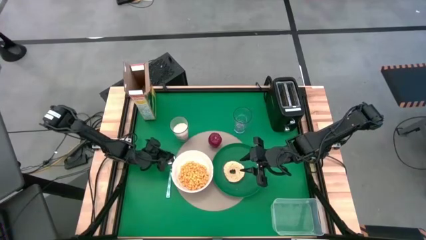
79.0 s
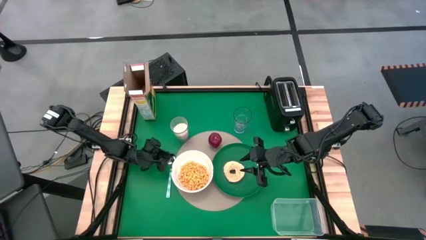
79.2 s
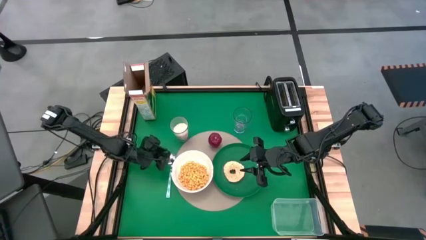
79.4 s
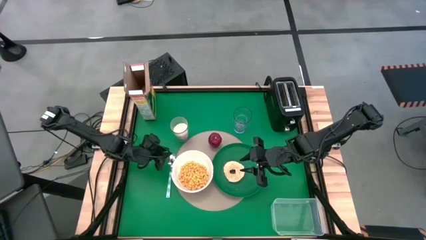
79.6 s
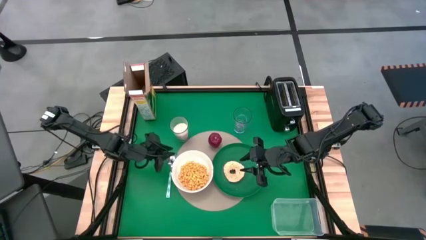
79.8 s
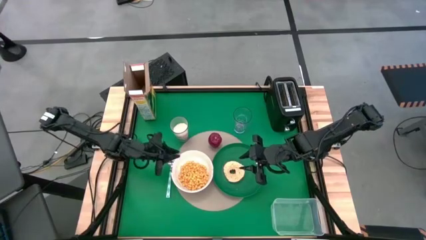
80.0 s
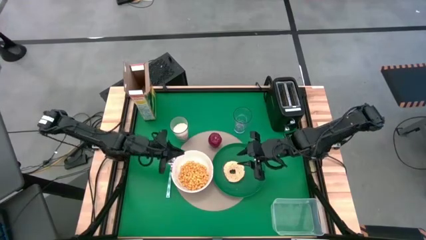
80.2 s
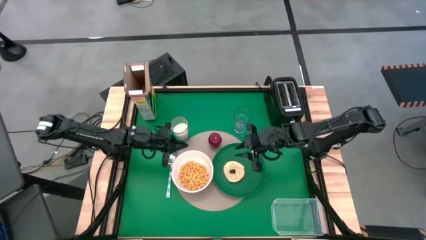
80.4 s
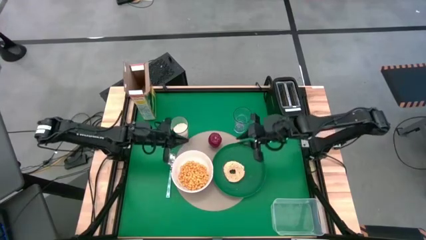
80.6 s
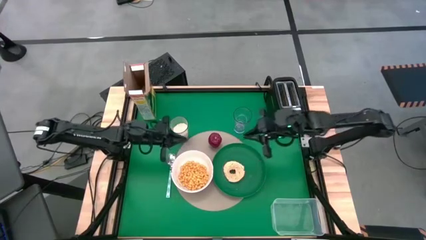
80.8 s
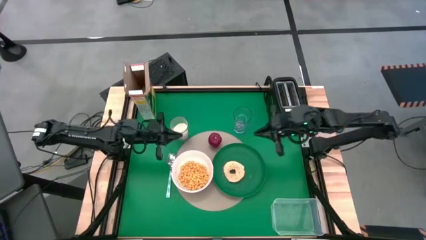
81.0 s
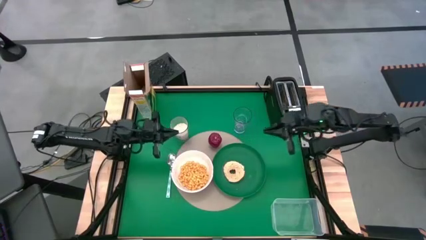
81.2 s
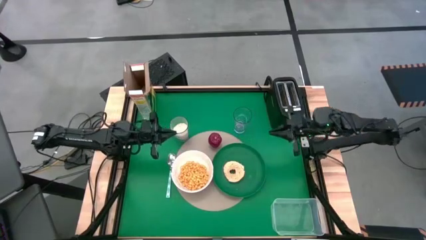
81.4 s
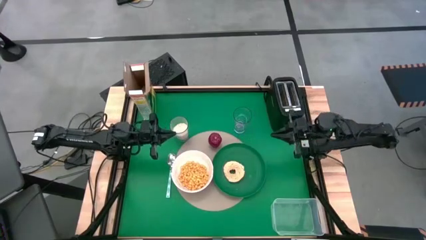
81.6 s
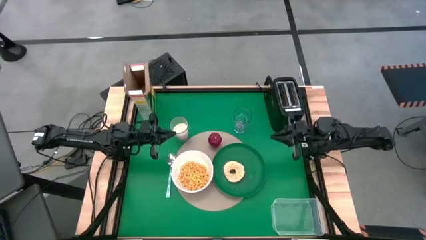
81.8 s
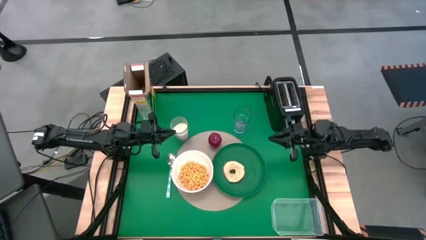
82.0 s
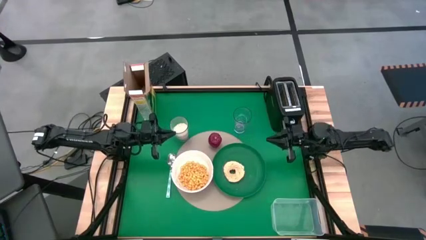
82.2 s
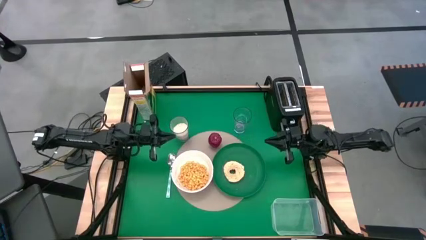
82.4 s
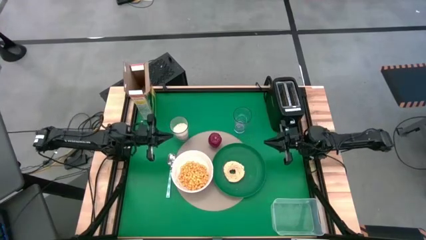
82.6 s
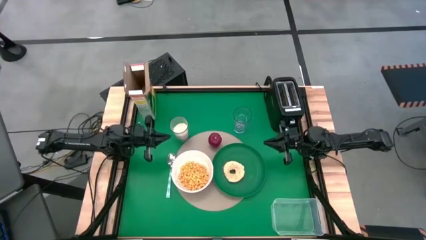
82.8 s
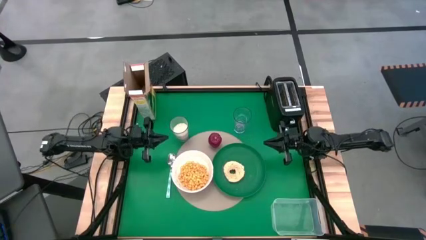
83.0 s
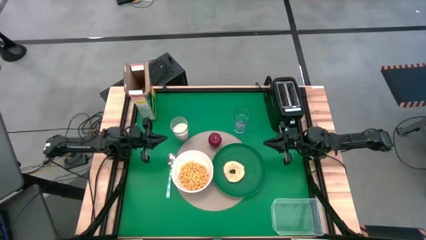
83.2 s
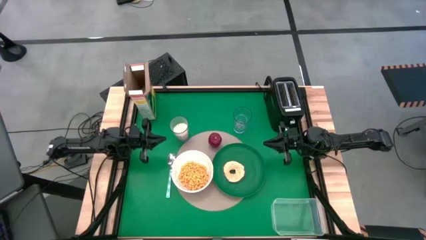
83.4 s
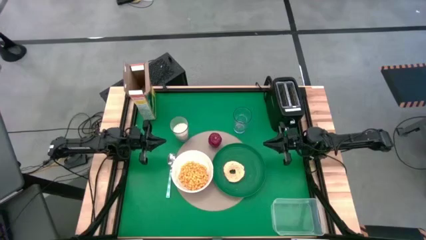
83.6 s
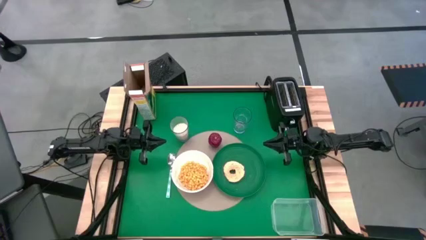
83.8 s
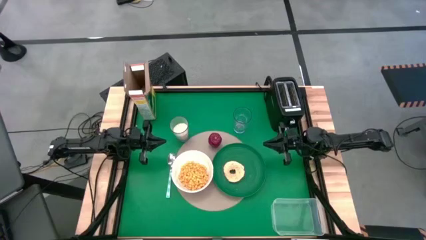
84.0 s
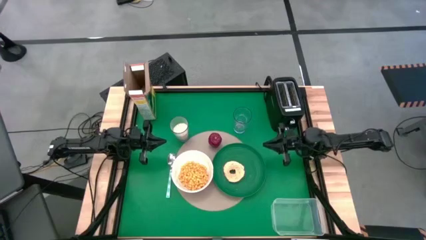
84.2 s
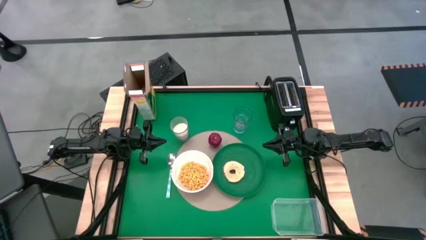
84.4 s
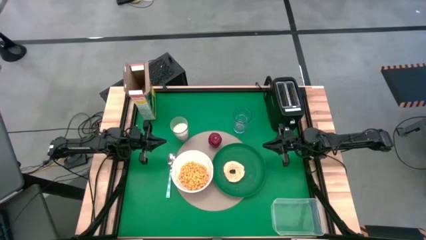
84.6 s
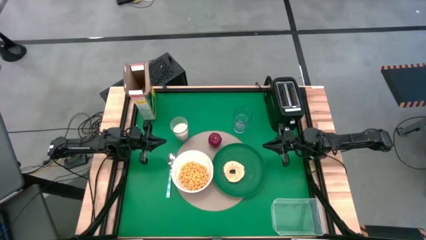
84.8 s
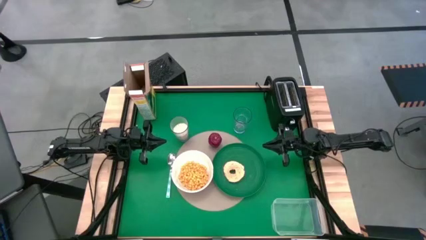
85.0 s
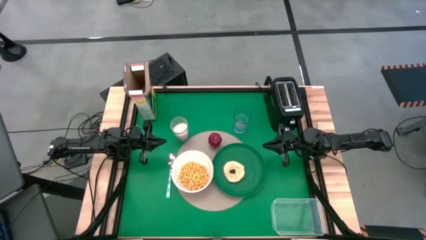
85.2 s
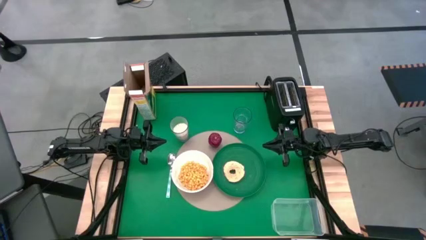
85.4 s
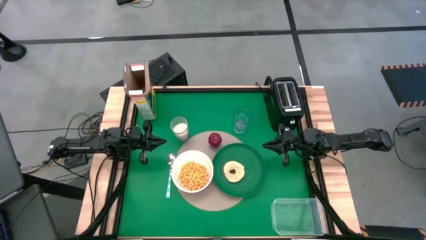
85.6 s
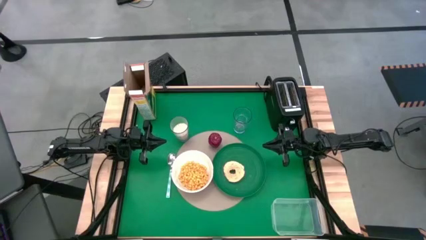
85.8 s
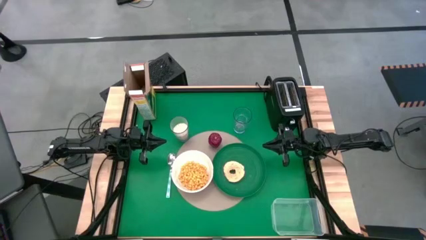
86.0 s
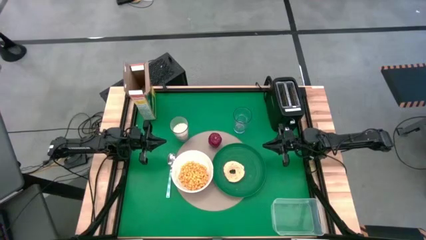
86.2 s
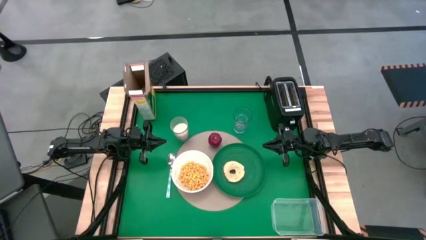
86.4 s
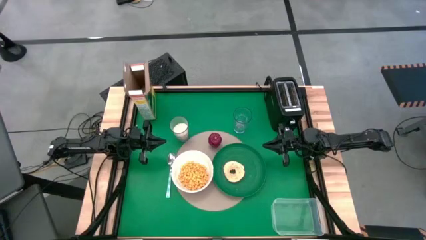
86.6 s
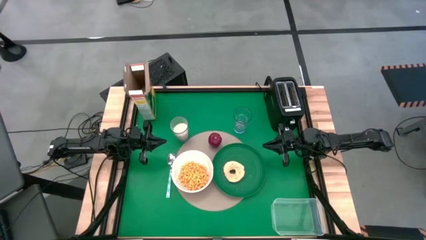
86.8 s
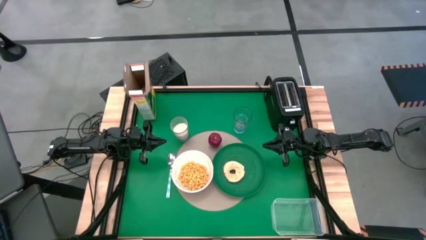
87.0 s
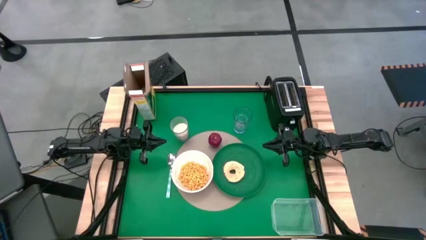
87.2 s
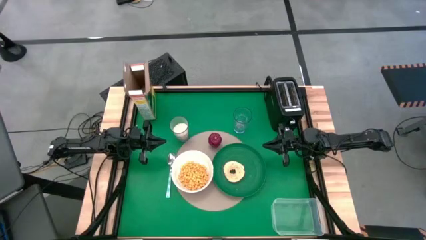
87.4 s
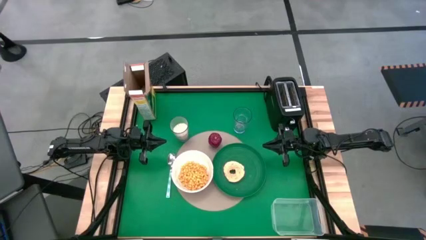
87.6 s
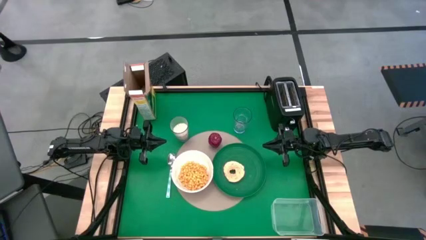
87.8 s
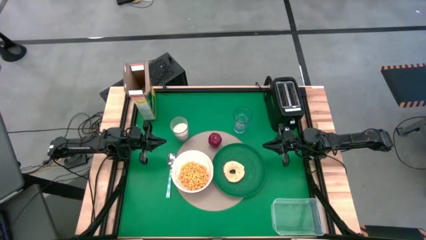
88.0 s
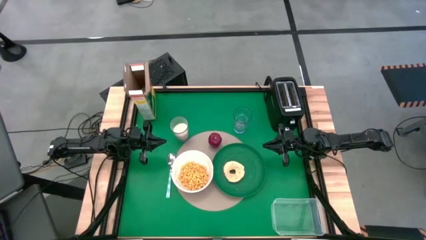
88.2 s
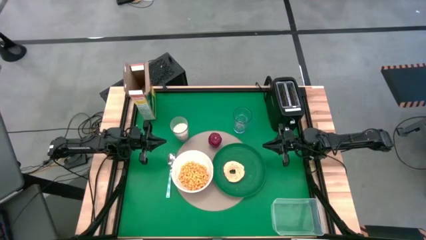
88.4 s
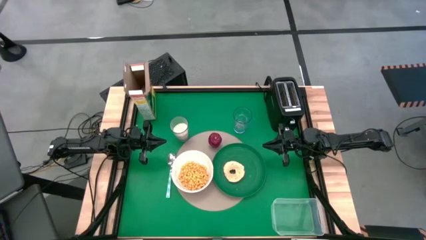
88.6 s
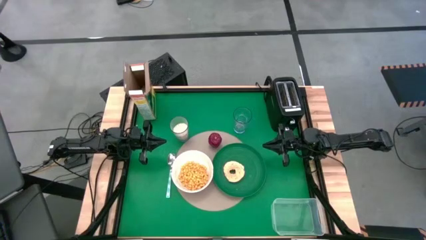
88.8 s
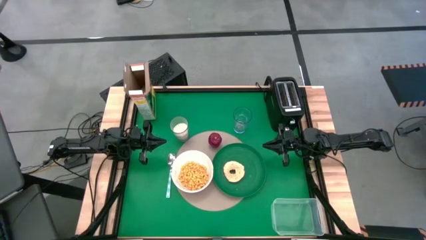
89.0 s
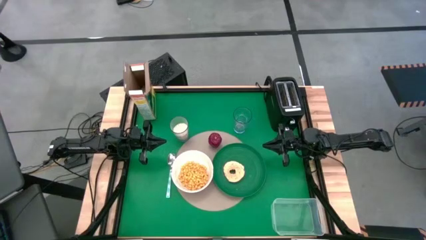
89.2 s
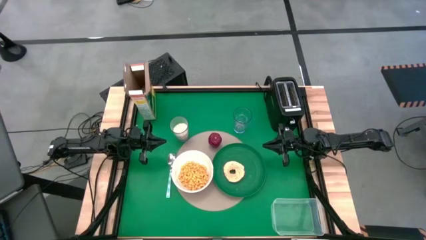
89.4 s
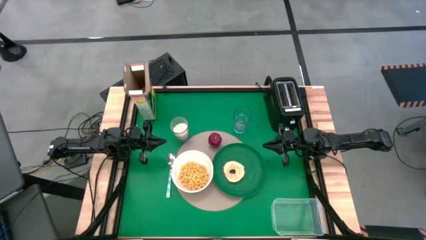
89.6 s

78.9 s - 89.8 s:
Task: Arrange a breakfast setting
Return to Home Position

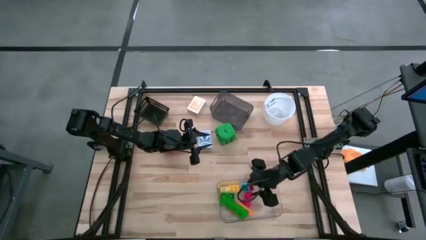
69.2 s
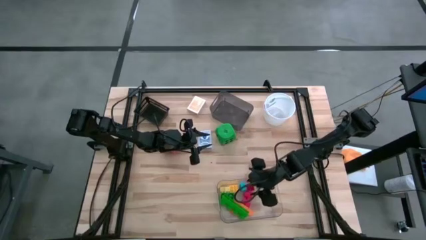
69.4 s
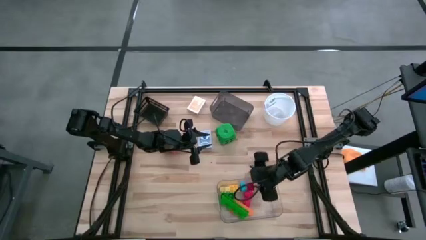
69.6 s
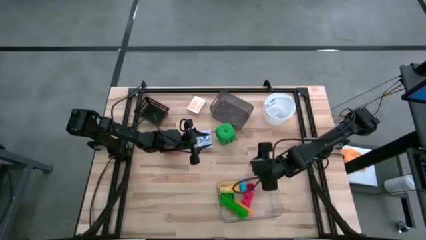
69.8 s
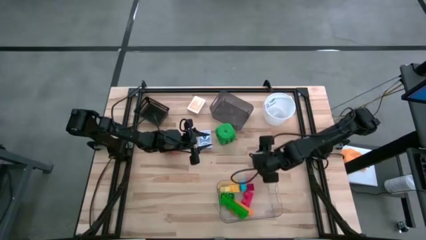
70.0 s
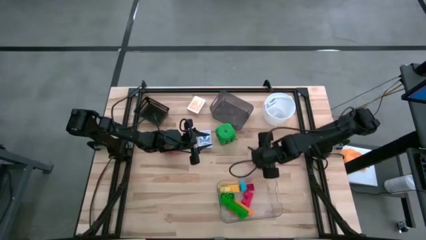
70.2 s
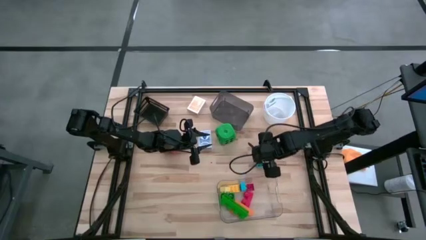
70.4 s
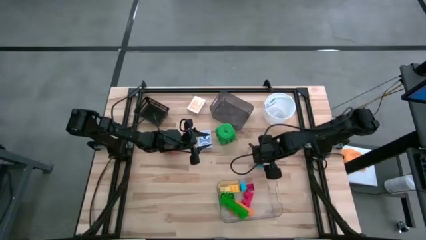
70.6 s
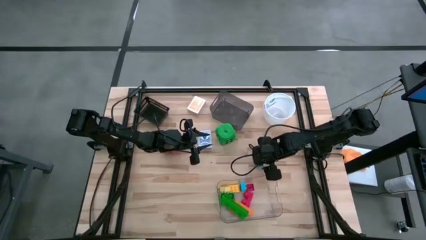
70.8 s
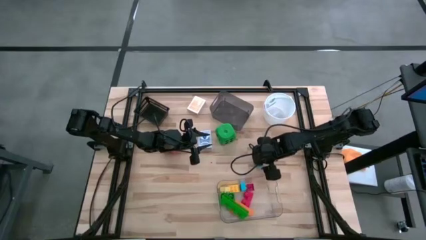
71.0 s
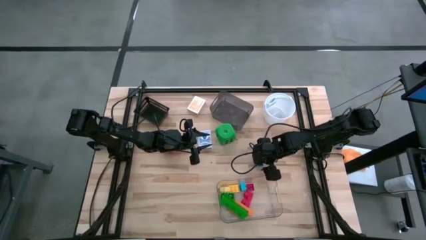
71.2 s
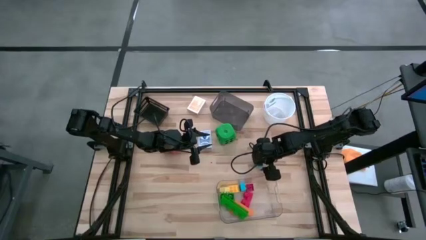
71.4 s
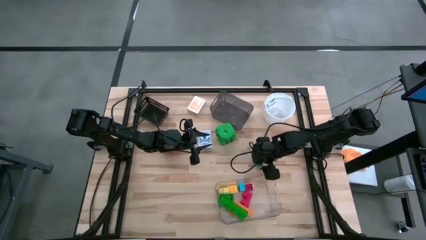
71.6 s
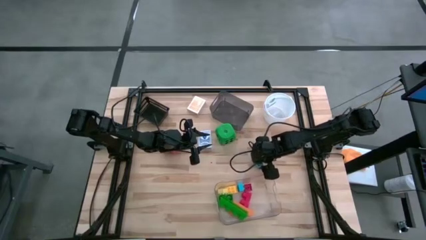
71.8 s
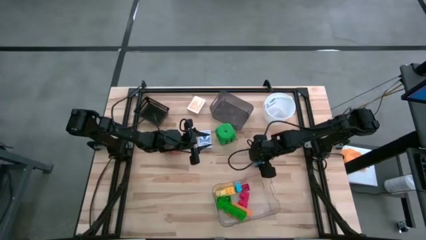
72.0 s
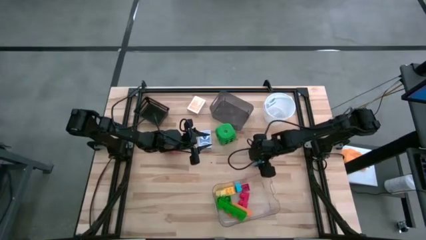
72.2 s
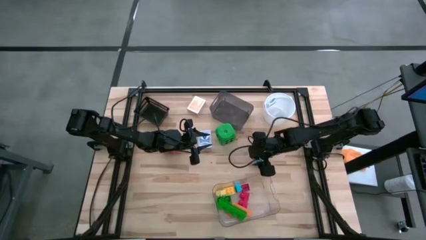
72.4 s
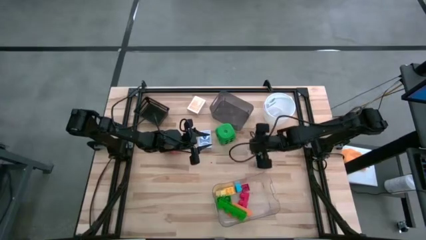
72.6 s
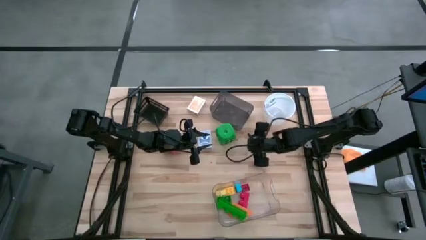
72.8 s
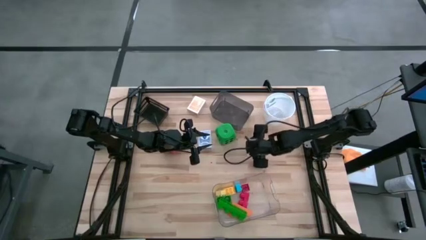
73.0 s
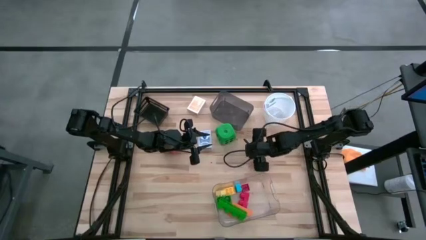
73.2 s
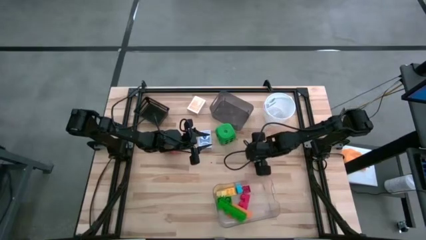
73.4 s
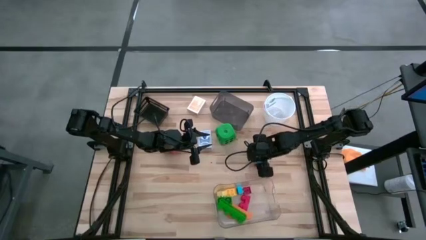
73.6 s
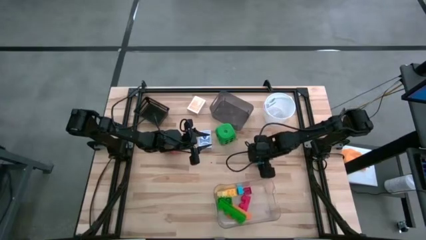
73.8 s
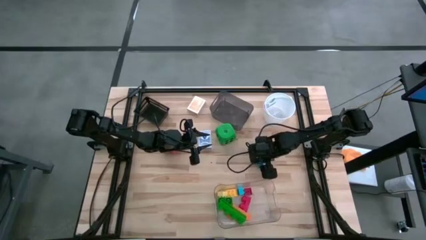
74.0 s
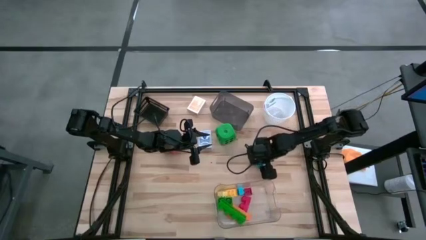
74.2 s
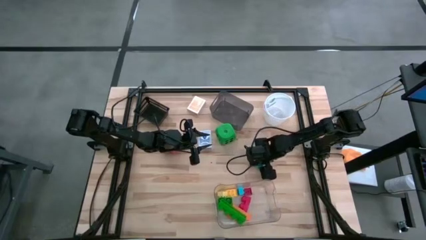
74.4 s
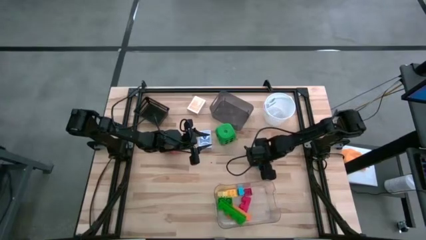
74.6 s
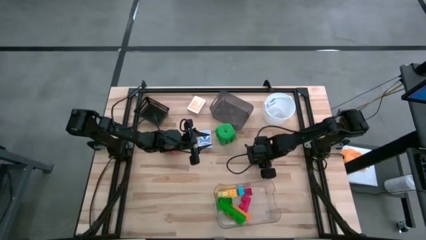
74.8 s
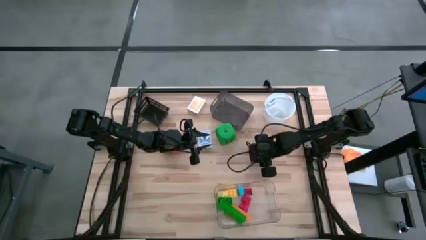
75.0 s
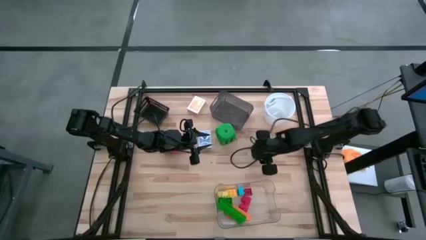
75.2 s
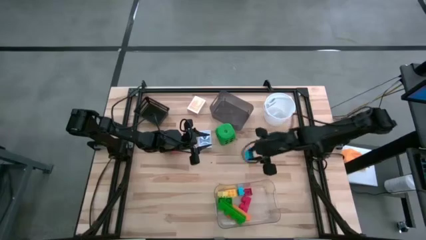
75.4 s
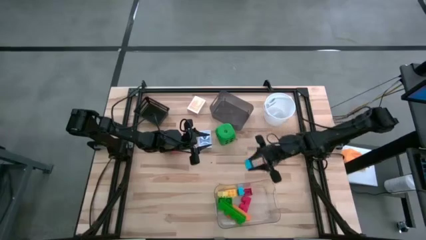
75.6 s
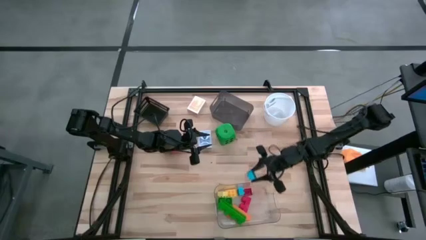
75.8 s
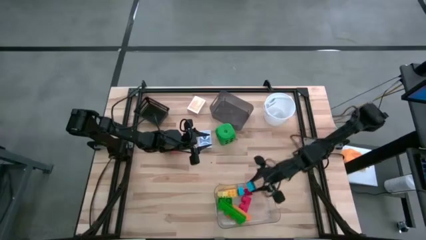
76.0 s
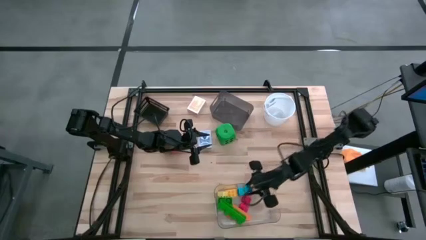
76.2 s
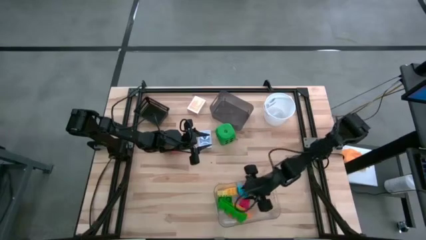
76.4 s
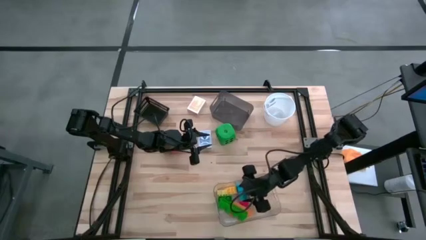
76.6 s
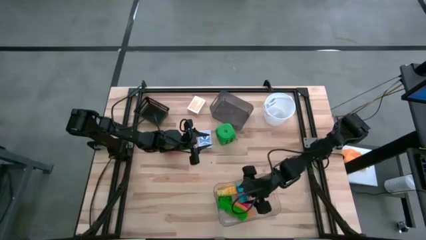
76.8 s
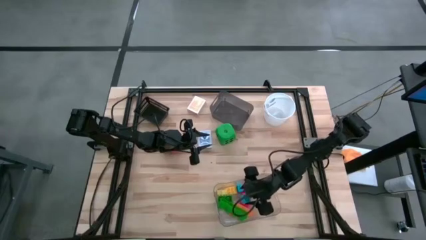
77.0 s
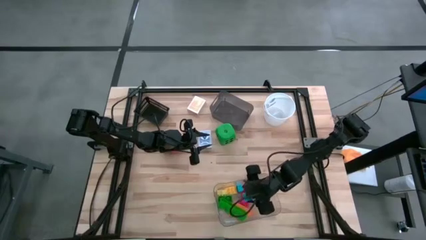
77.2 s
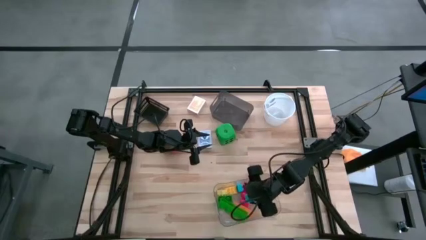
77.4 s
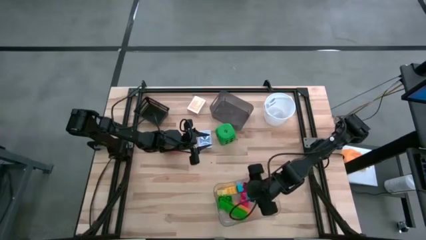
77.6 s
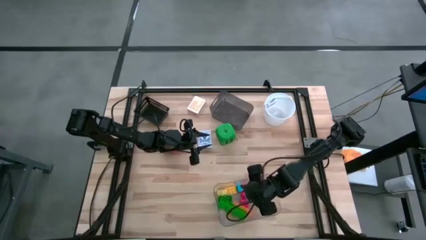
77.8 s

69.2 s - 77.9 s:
Task: Pick & Place Toys
Put the blue game piece into the bottom transparent bin
